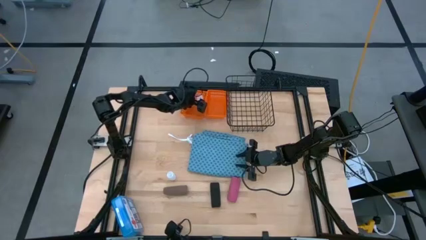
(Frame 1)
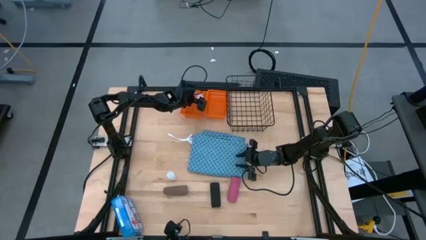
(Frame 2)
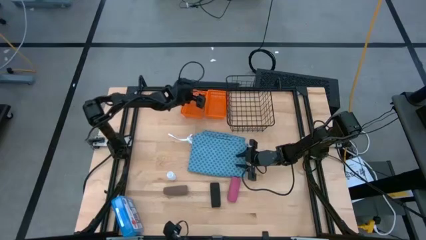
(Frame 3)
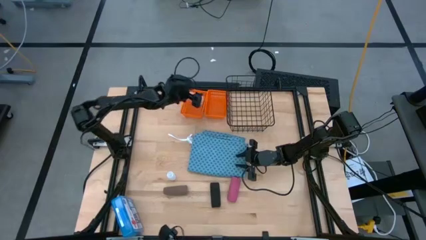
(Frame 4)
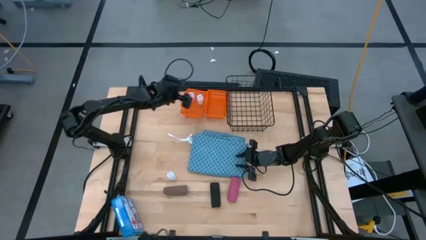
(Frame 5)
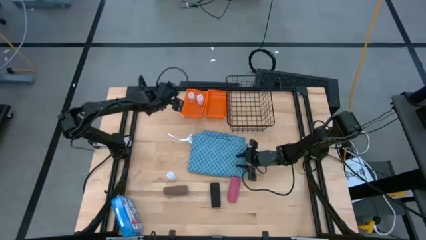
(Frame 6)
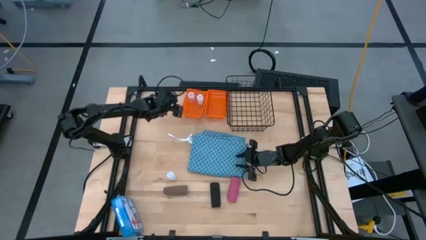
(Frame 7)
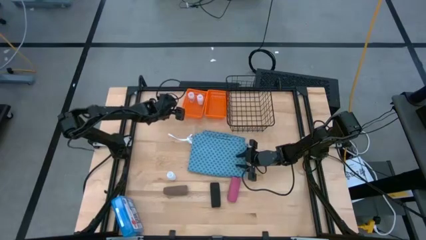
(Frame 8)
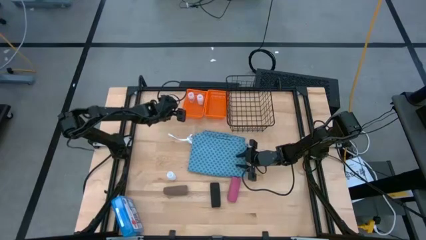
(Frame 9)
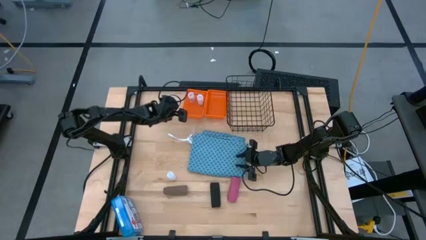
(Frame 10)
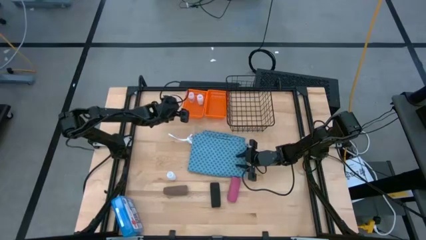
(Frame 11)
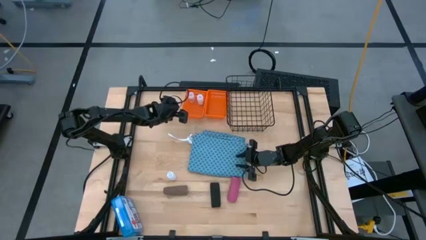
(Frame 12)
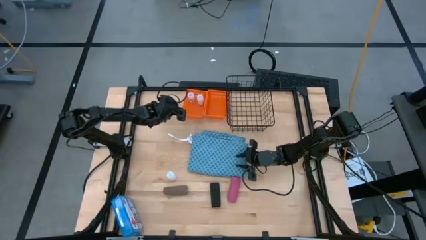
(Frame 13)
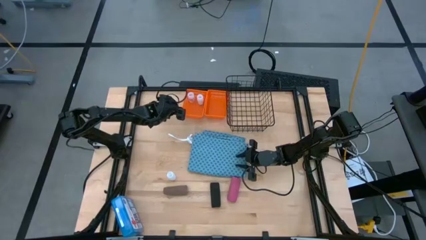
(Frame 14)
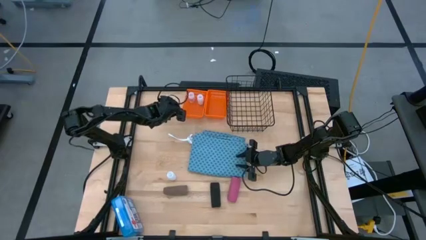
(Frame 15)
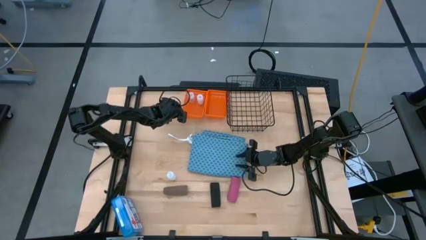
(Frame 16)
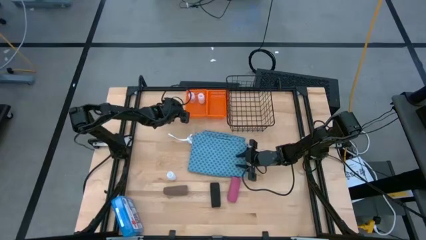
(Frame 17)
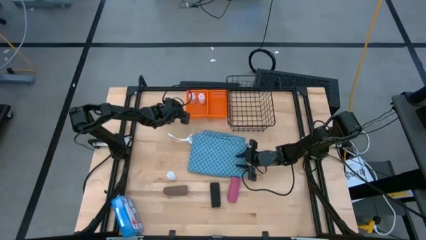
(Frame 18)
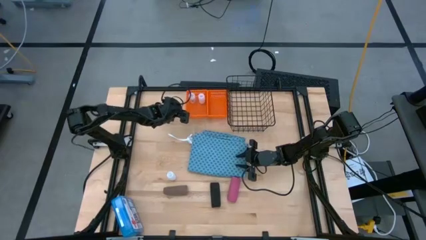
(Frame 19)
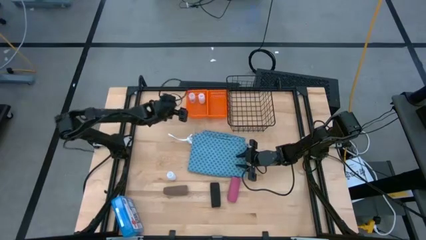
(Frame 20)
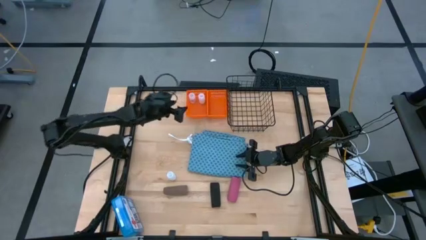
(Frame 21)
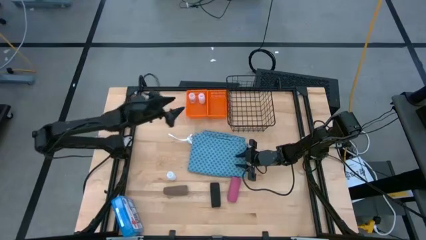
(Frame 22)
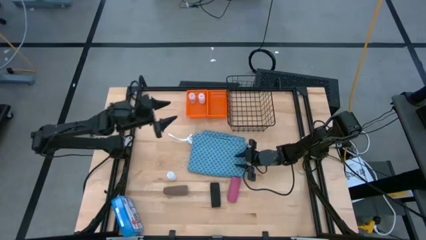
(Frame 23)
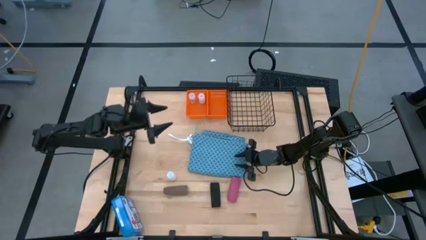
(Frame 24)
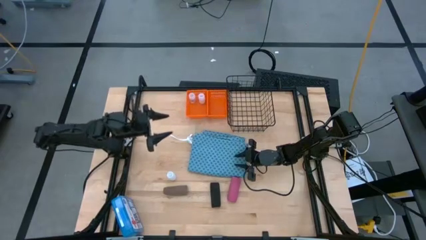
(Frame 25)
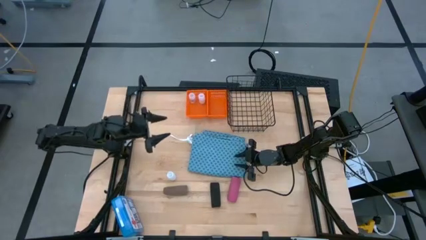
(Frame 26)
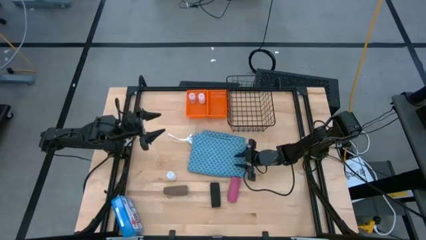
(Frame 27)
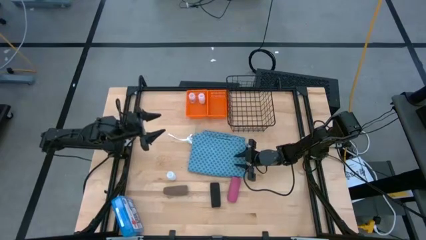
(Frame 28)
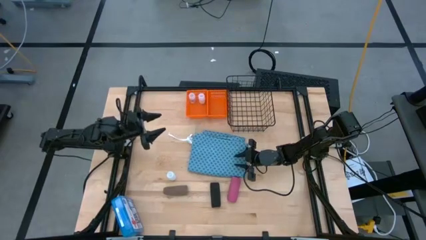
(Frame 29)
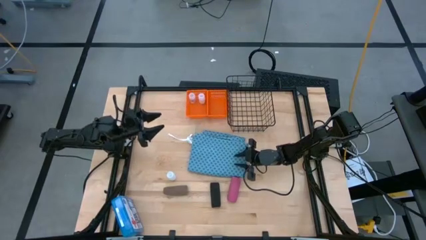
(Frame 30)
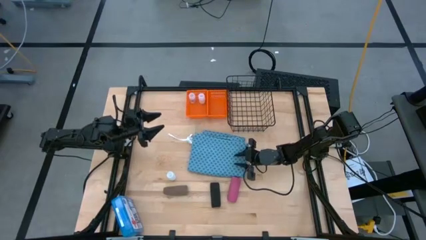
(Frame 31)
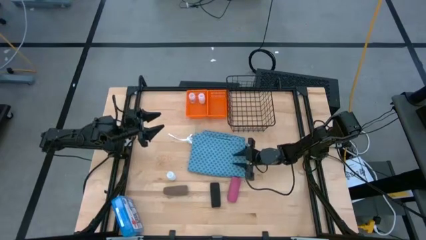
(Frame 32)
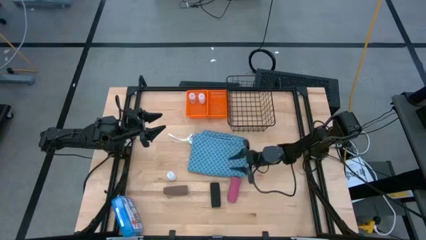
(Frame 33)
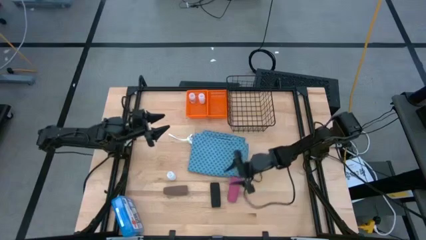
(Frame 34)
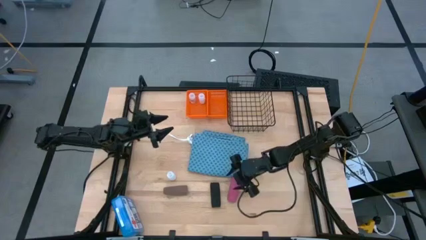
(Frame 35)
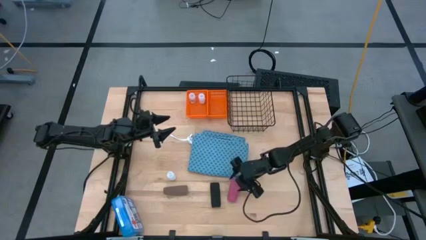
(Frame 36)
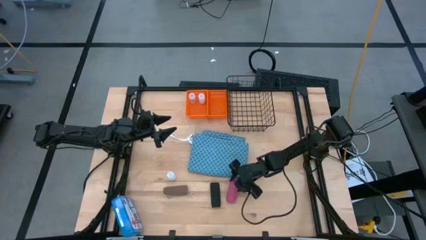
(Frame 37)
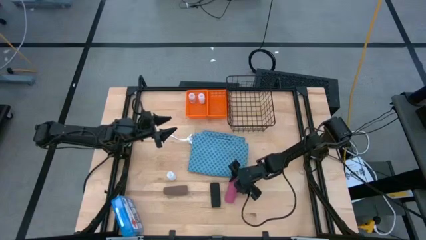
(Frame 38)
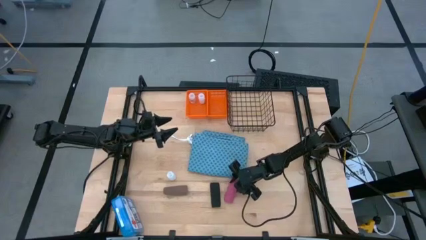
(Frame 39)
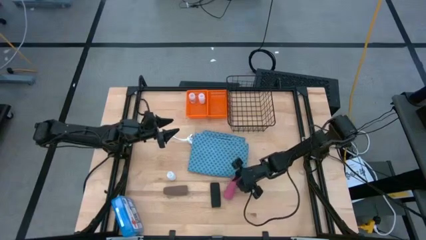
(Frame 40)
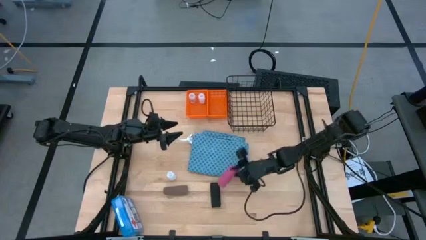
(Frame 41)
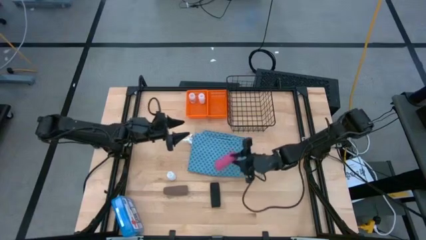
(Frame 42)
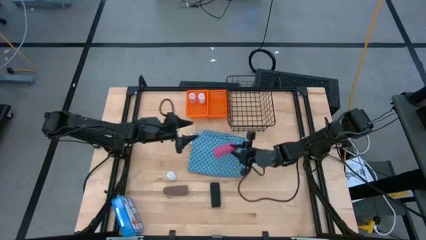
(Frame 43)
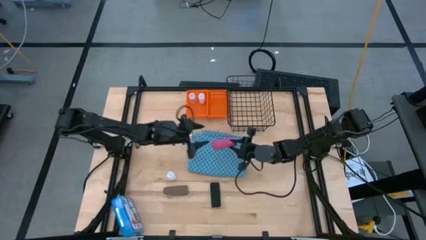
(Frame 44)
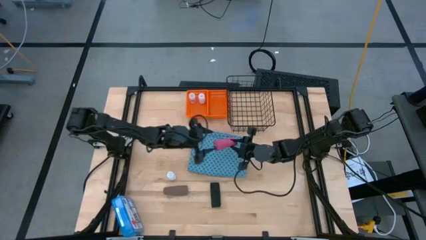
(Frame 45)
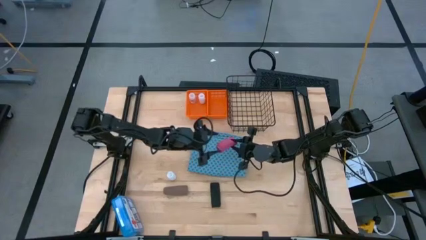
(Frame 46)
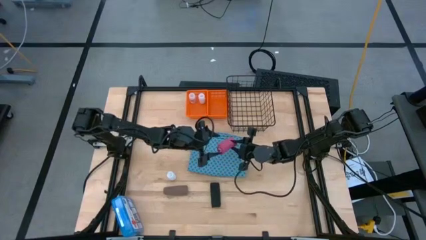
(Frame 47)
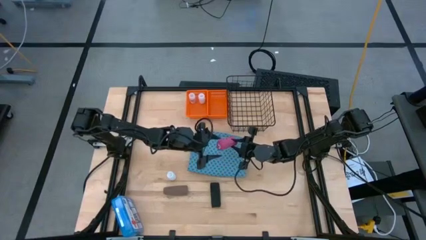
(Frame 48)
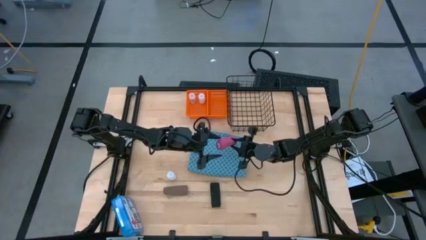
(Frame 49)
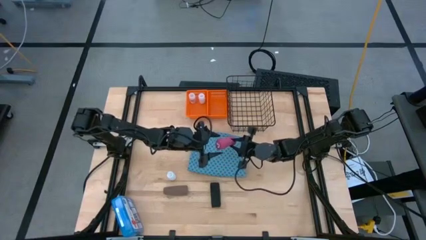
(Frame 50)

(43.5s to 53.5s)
Task: Pick & Place Medicine items
Put the pink bandage into the right orange basket

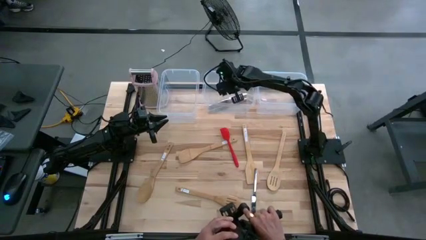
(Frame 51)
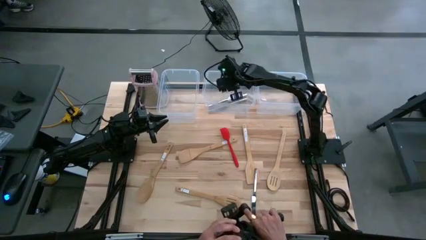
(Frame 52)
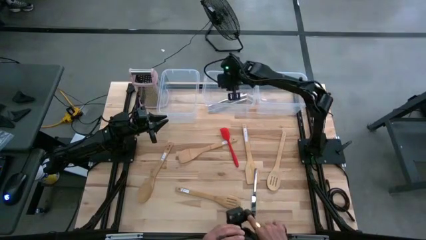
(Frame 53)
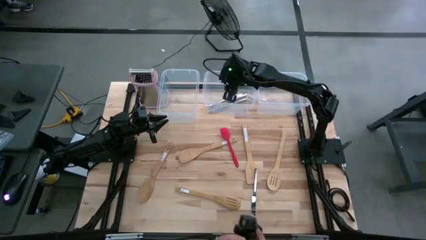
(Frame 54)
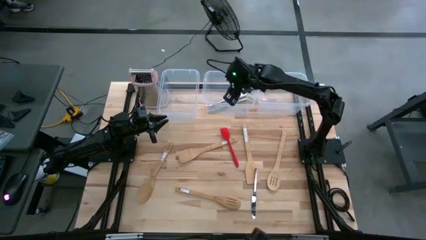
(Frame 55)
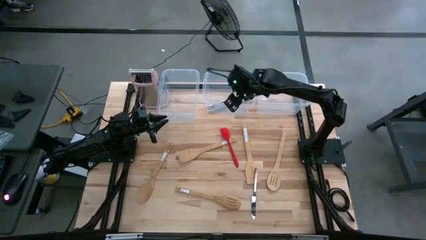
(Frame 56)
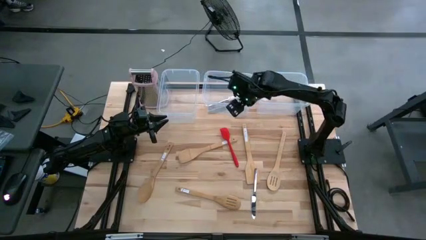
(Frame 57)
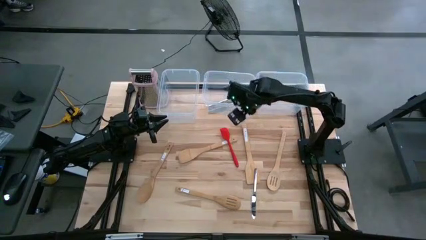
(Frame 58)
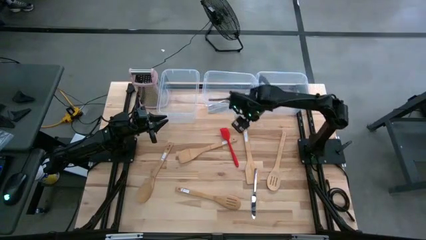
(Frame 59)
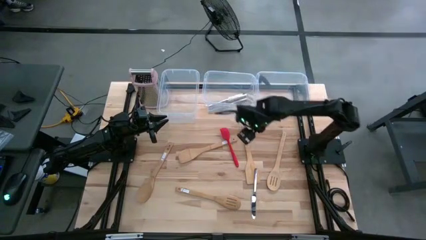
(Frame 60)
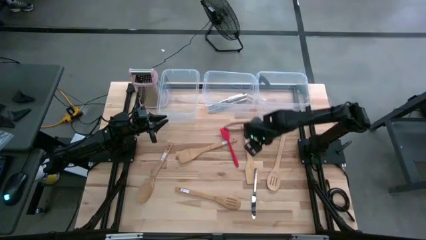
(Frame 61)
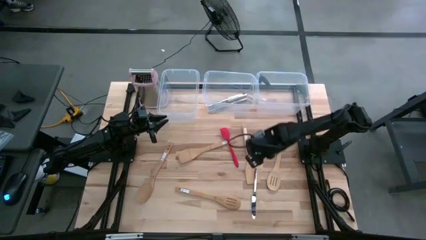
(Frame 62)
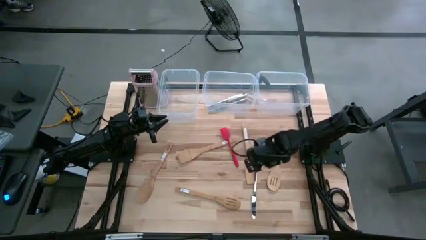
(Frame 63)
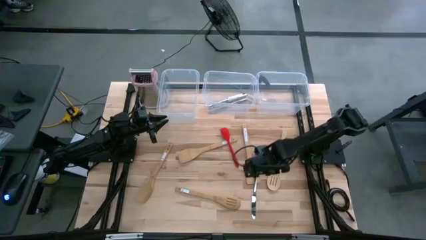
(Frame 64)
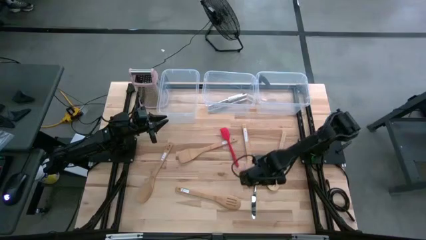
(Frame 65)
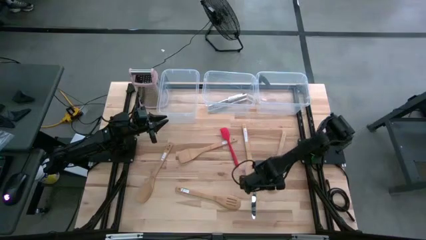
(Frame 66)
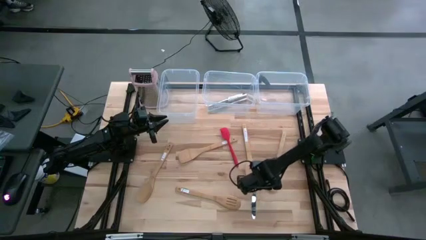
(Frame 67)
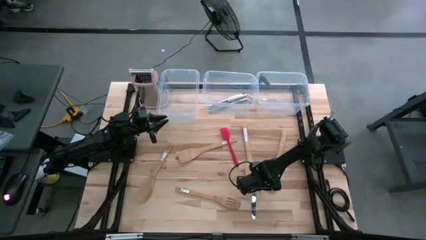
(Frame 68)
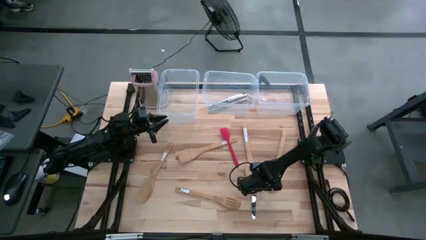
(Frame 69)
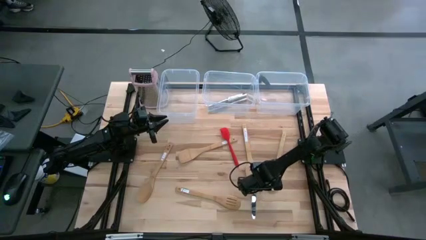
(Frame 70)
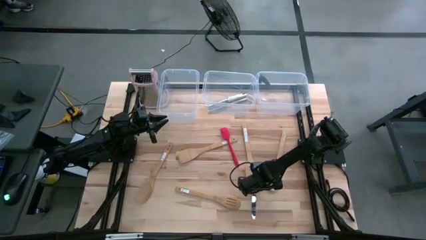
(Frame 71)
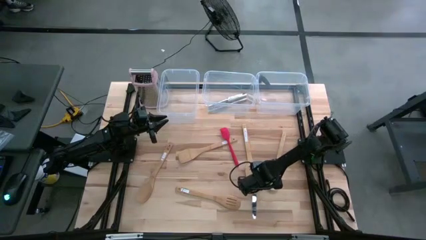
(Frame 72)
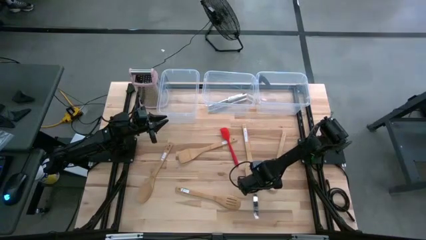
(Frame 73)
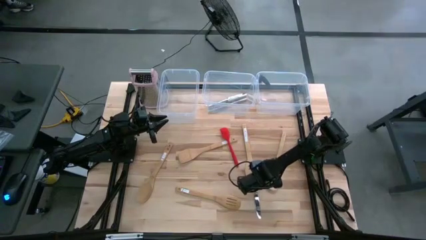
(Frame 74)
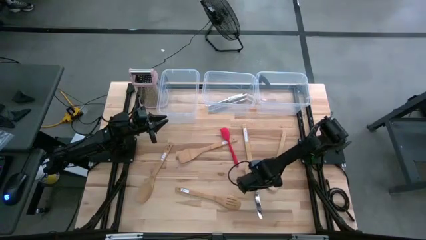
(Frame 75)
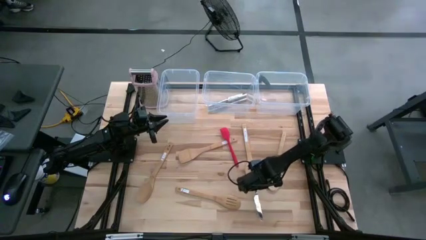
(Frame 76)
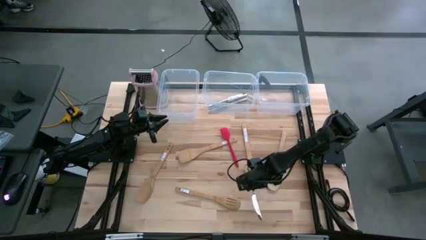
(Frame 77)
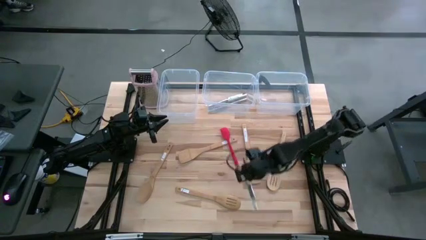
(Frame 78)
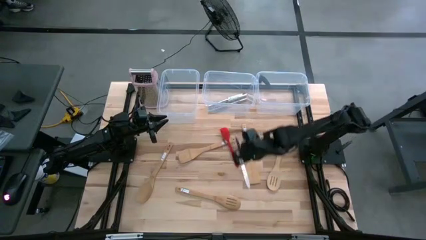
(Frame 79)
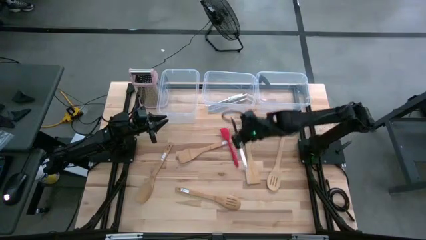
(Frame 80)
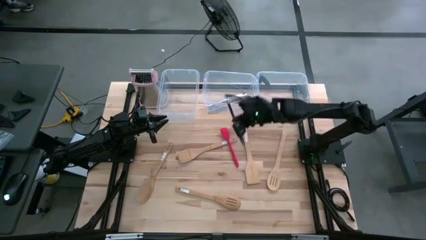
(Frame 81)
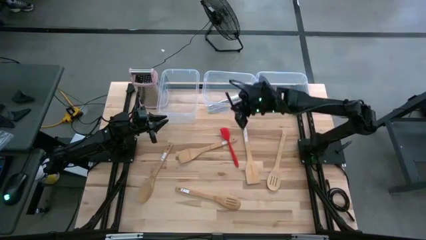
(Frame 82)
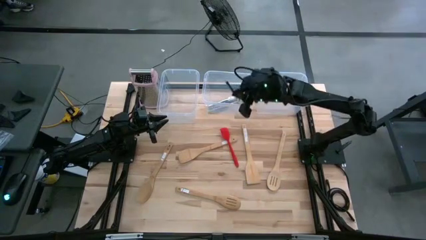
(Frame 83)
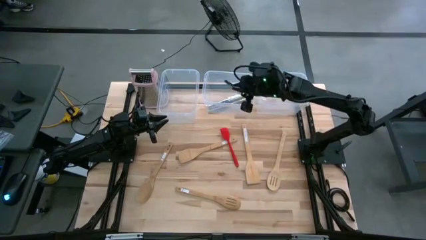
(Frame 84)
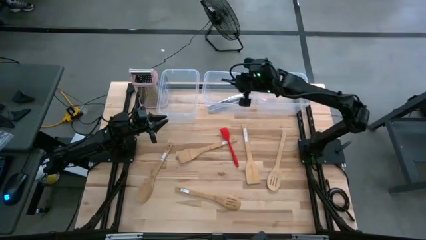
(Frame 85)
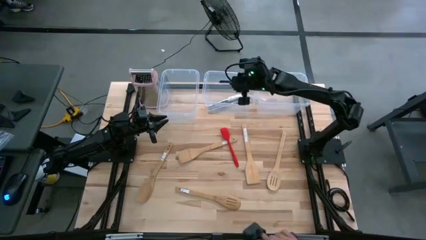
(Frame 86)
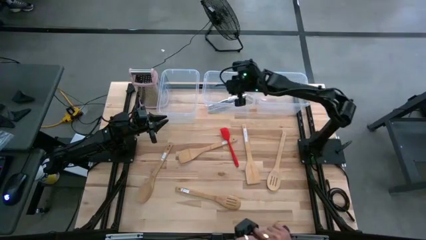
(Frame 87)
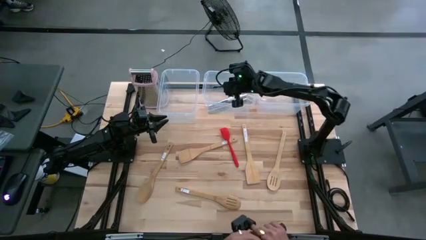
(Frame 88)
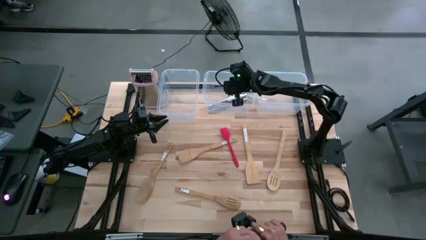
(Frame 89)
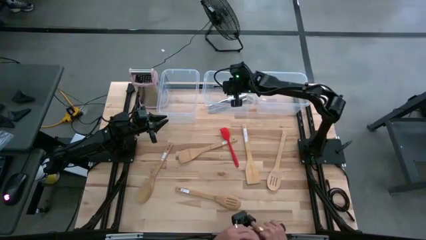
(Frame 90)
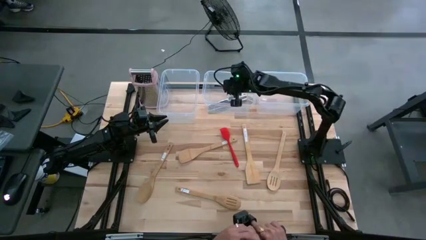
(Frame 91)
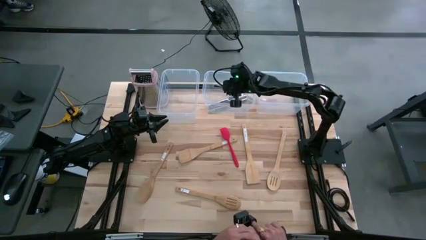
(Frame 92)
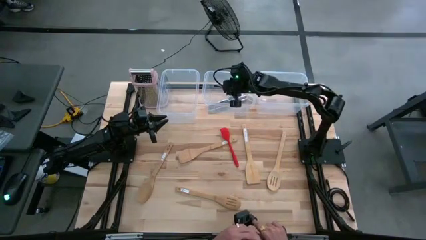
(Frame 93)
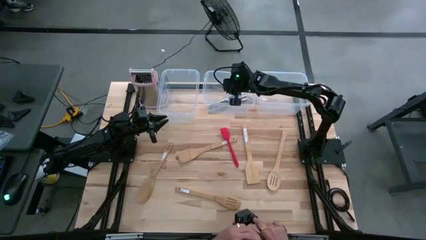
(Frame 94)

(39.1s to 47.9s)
Task: Pick & Place Kitchen Items
Put the silver table knife into the middle transparent container
